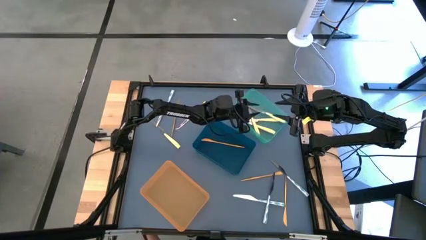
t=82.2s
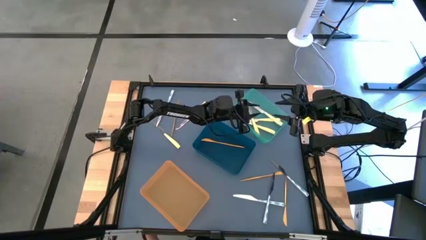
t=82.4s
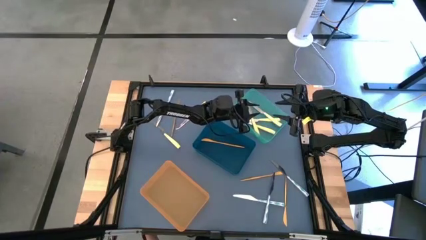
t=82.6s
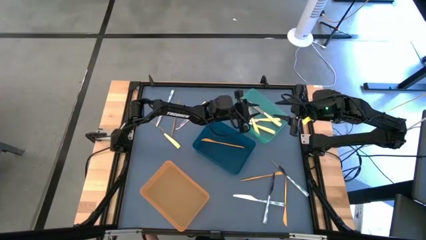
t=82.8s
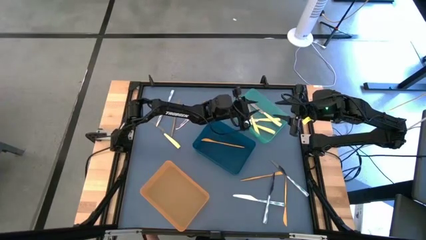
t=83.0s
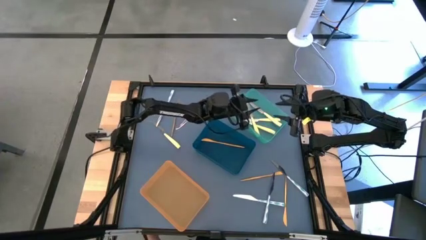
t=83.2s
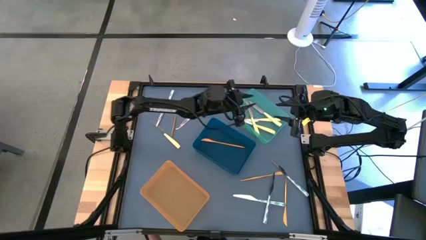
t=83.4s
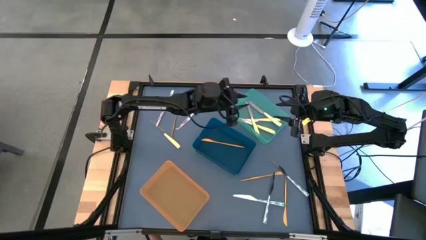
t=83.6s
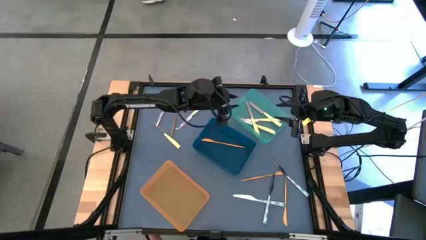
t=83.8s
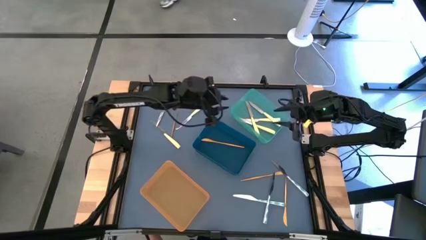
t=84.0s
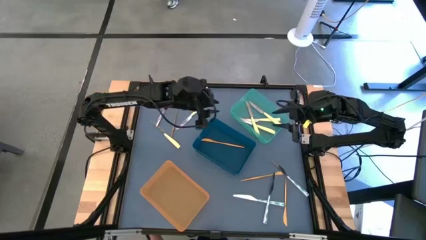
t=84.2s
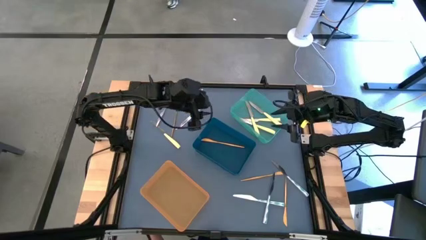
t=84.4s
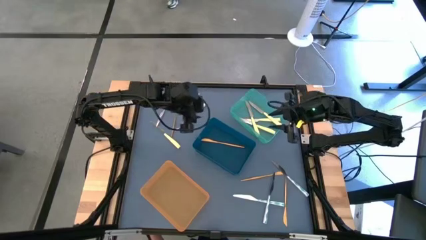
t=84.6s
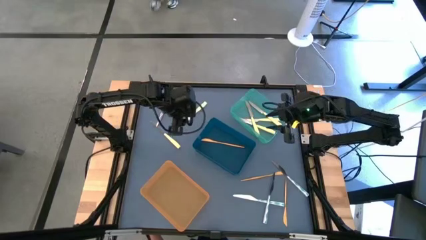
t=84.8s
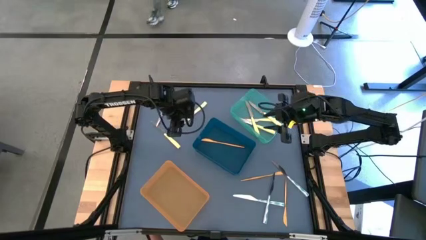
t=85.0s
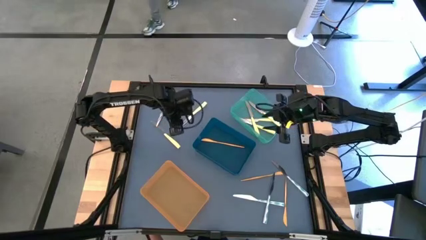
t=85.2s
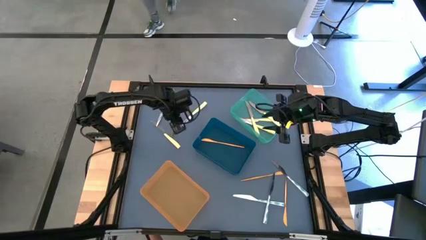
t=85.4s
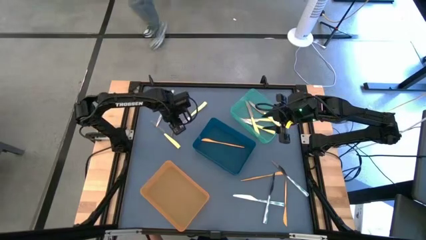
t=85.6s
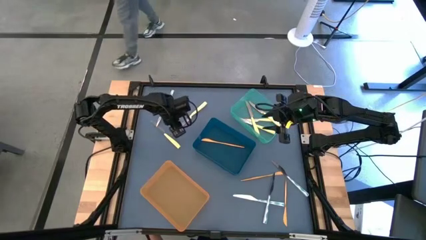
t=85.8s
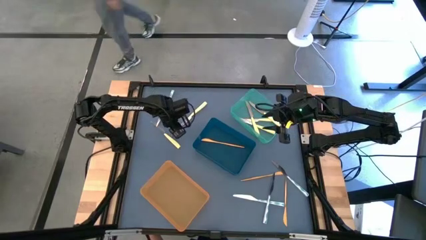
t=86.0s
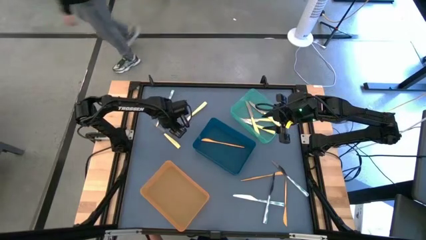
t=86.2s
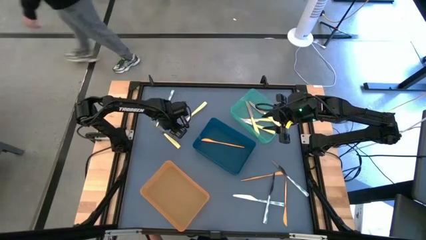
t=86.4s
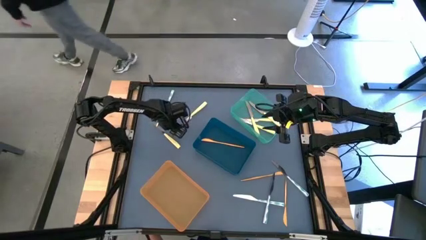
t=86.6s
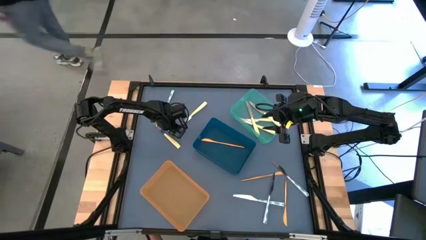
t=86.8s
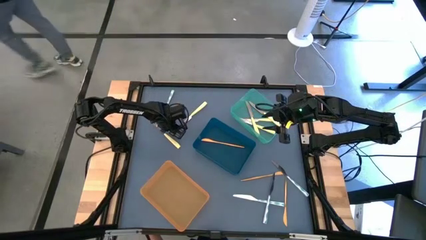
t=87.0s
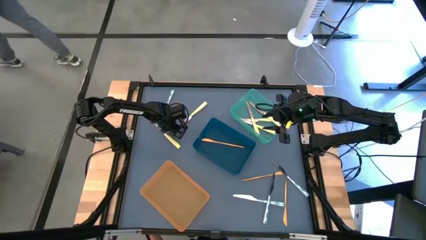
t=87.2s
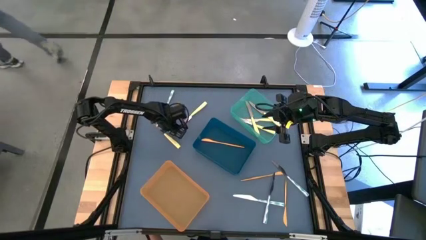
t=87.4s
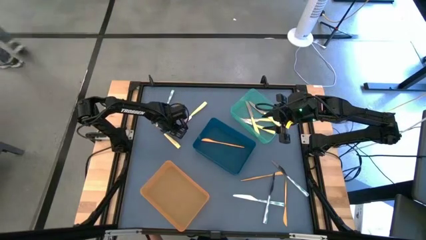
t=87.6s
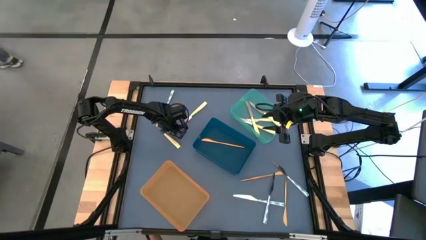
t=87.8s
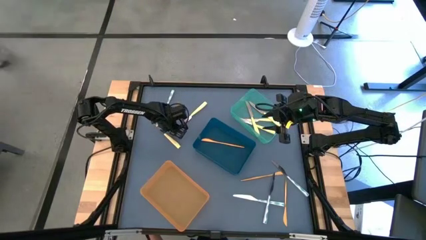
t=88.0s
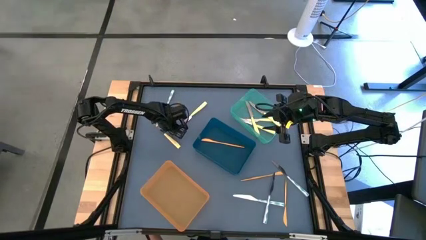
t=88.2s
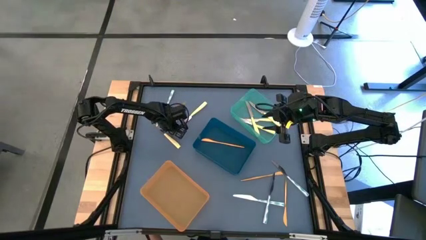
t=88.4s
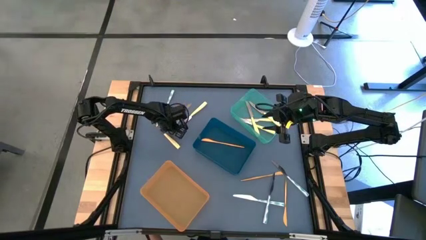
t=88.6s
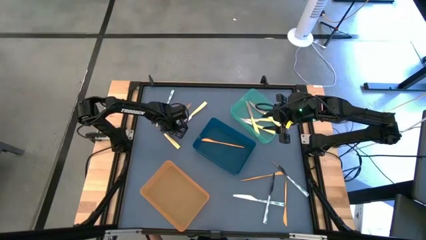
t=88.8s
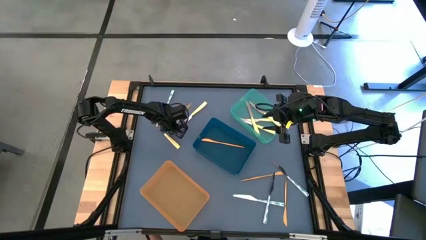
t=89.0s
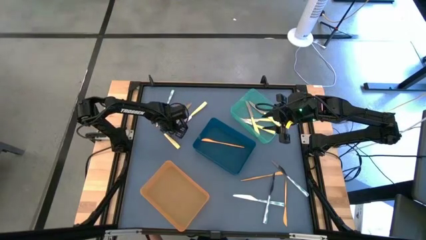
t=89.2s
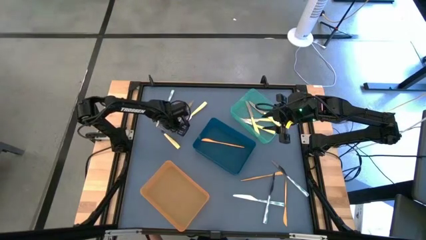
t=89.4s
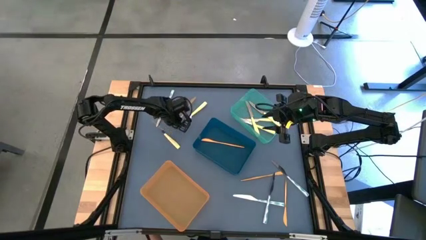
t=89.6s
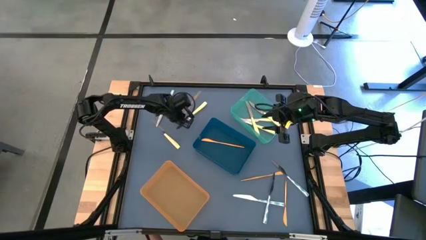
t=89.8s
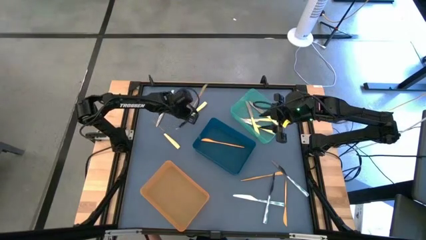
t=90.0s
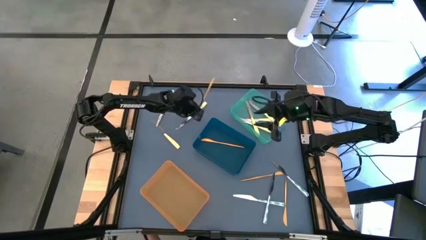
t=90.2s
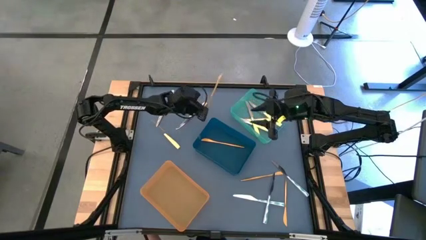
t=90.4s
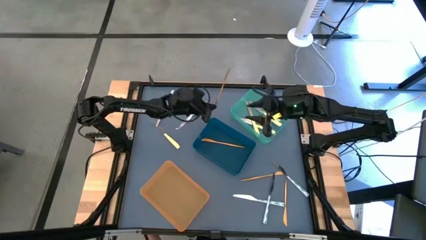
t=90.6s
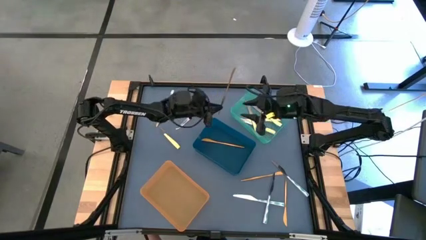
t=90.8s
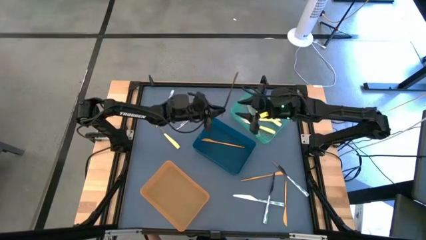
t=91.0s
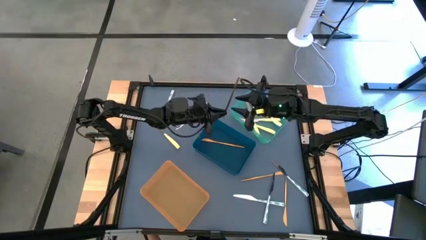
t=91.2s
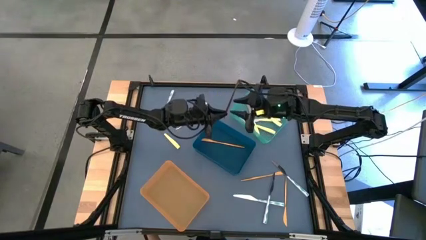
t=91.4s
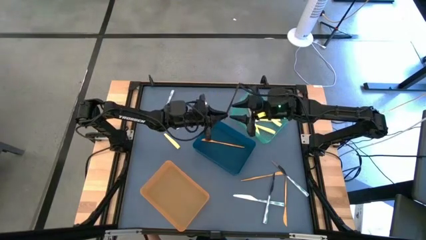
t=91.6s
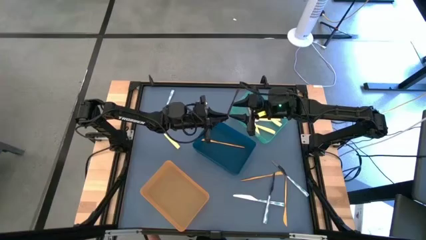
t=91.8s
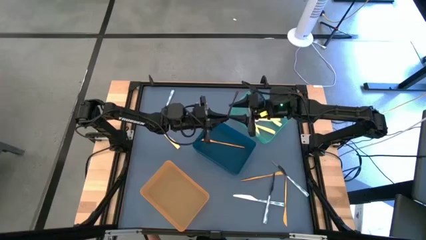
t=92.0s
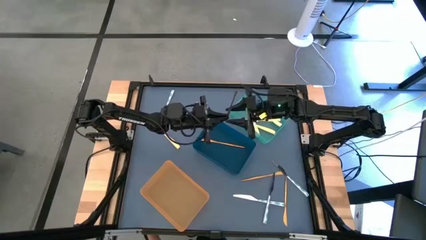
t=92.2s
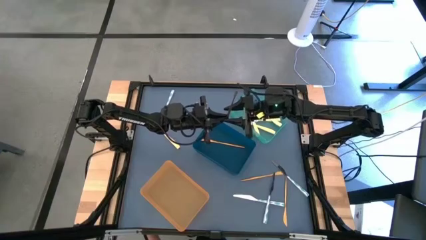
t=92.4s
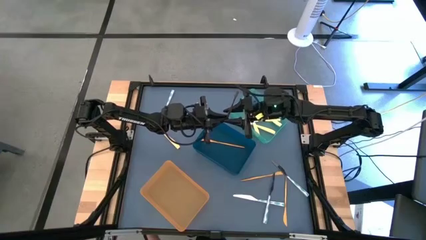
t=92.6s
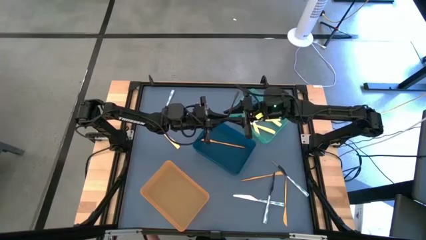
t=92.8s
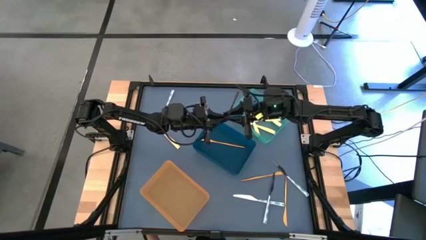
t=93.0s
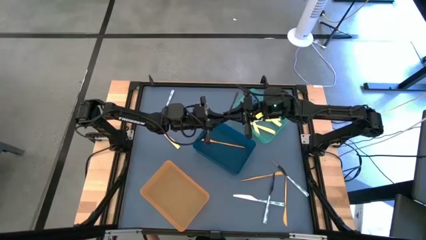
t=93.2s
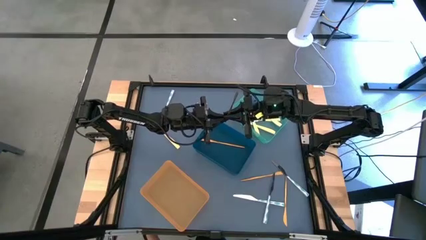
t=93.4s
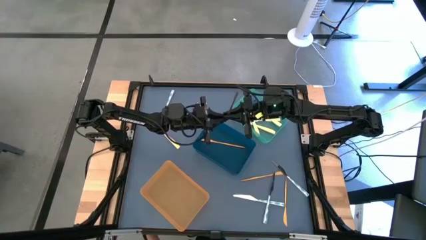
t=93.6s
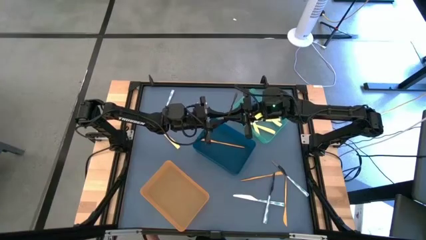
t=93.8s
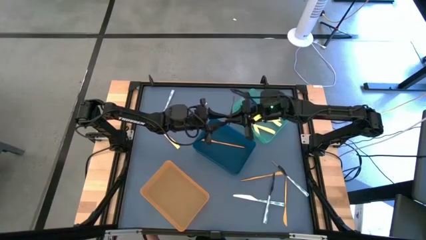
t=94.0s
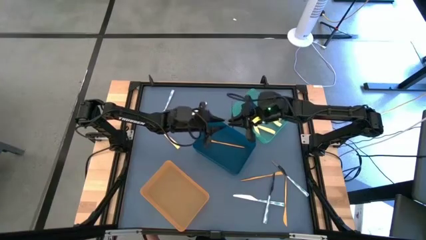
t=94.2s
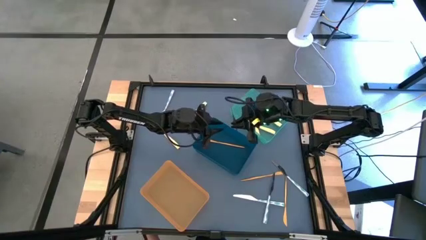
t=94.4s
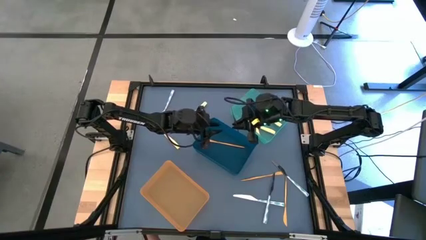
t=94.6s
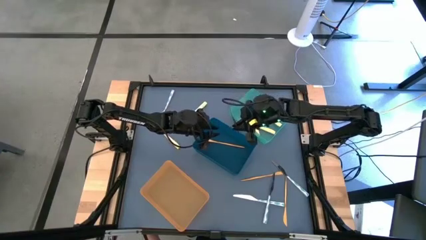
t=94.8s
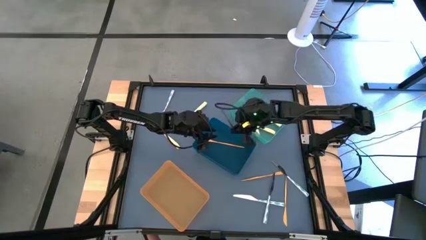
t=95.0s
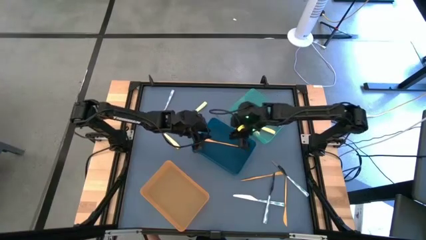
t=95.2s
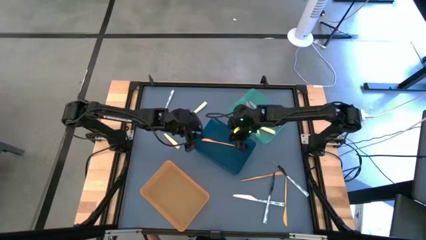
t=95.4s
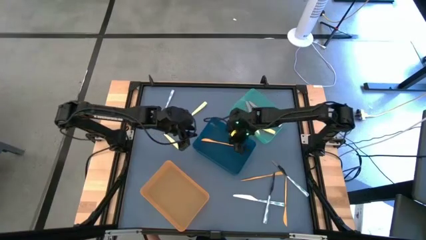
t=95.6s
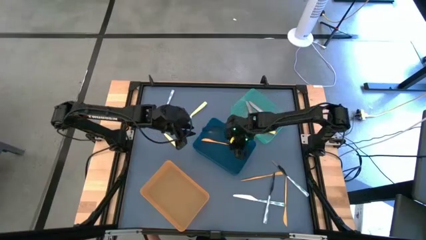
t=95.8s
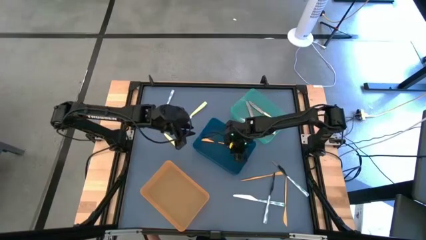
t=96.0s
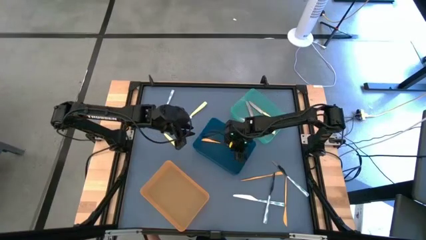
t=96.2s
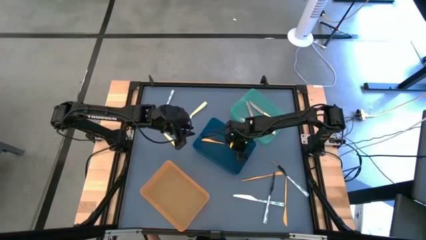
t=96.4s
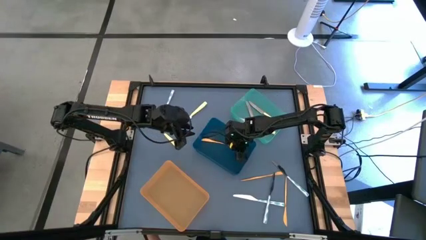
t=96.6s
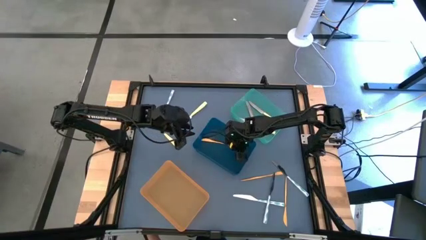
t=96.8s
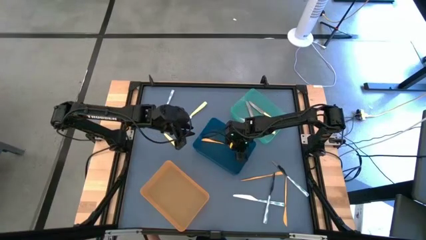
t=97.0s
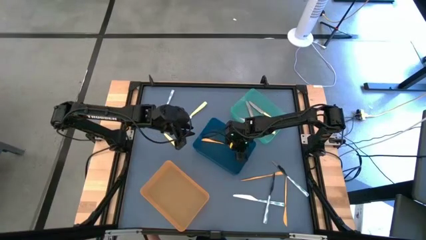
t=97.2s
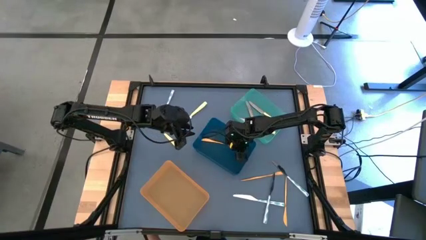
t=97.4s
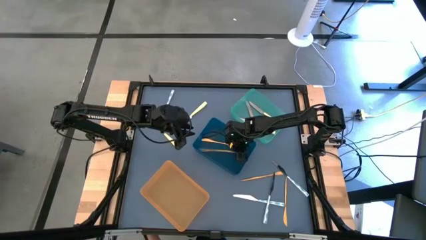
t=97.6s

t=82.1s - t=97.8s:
Task: Sort silverware by color (type)
Put the right gold knife into the dark blue bin
